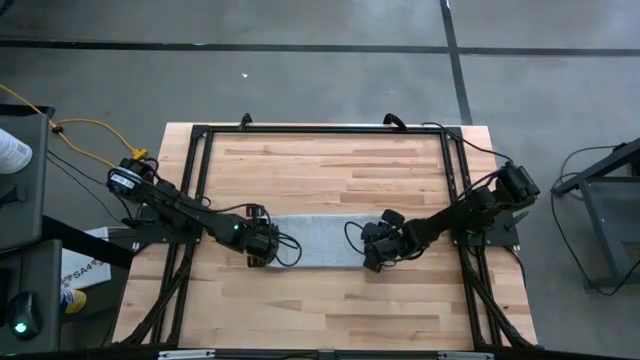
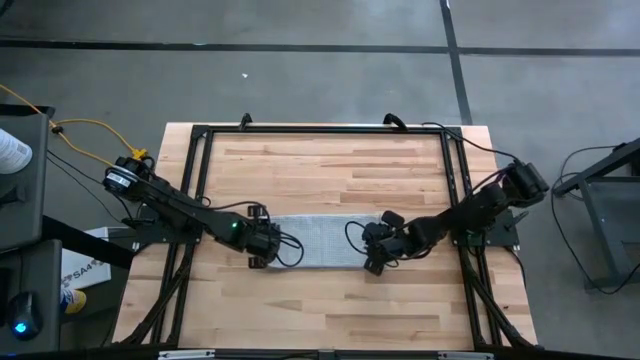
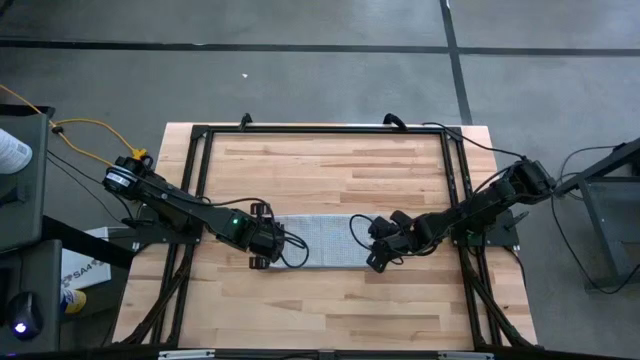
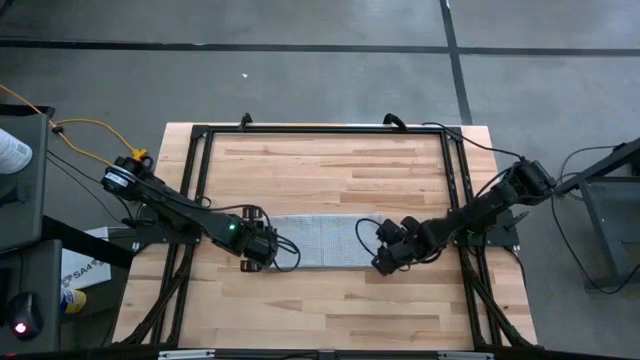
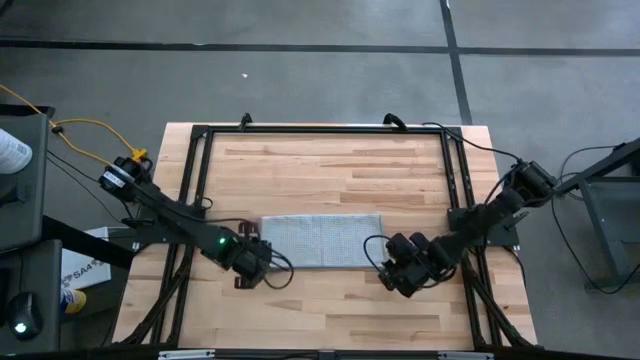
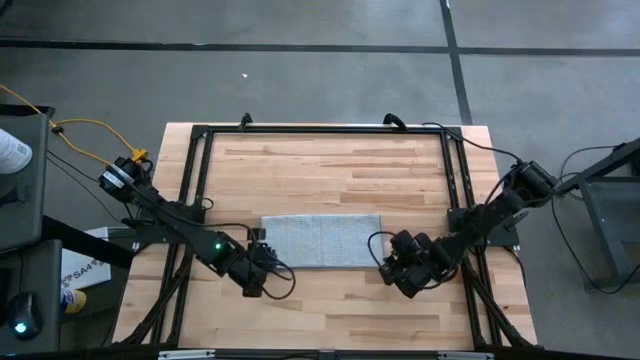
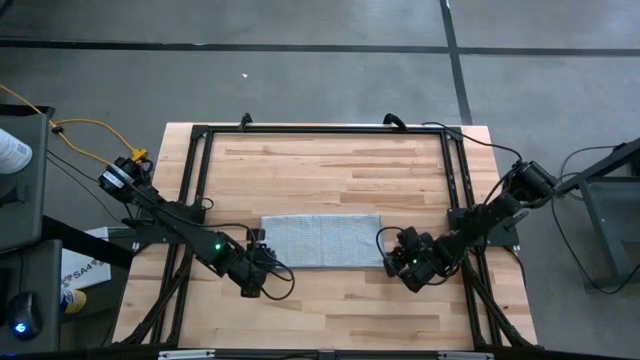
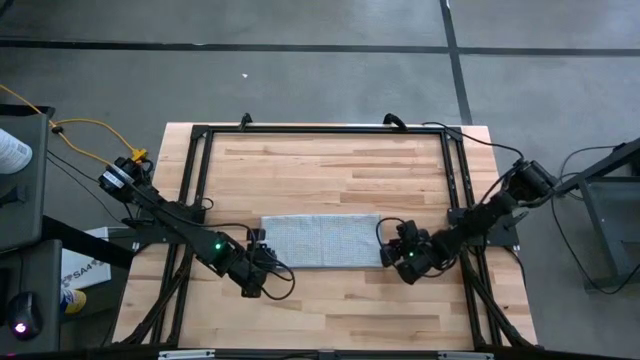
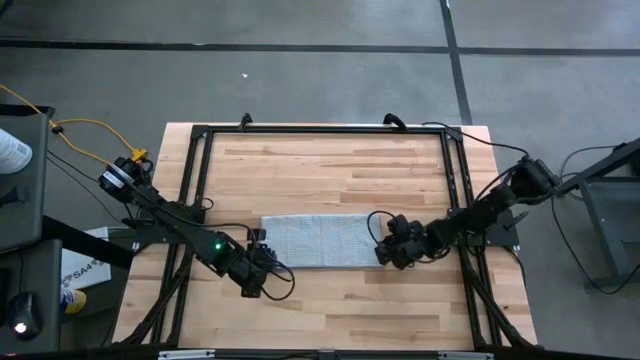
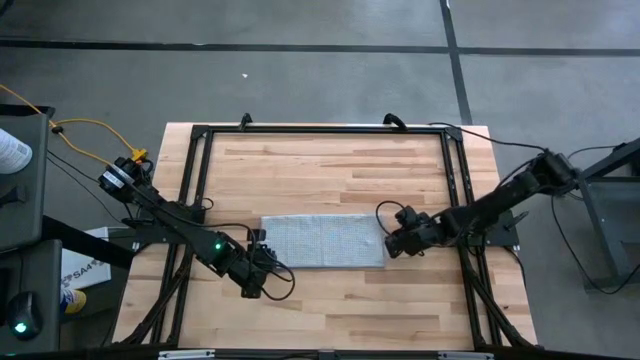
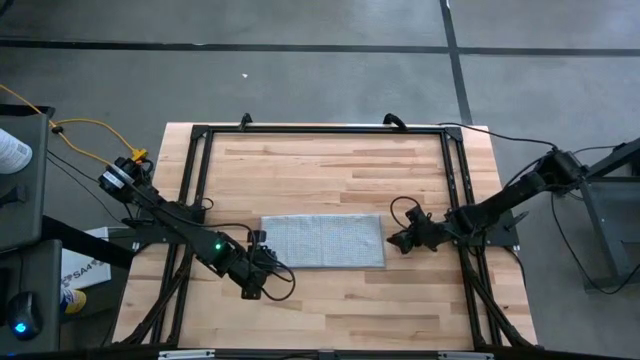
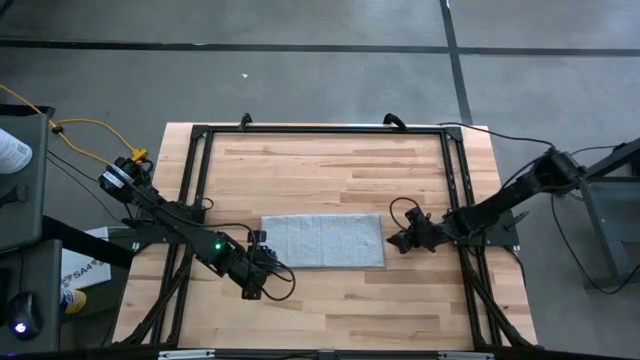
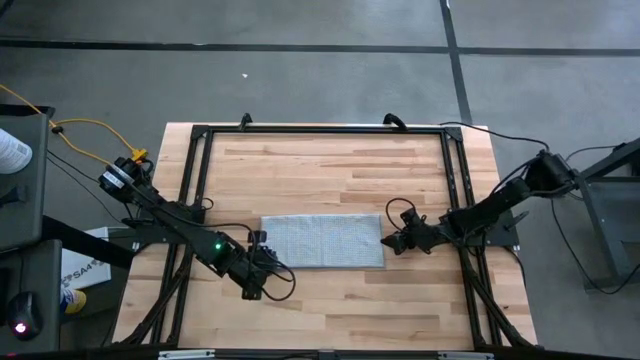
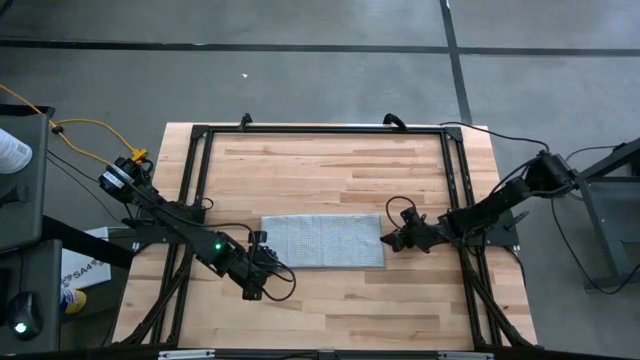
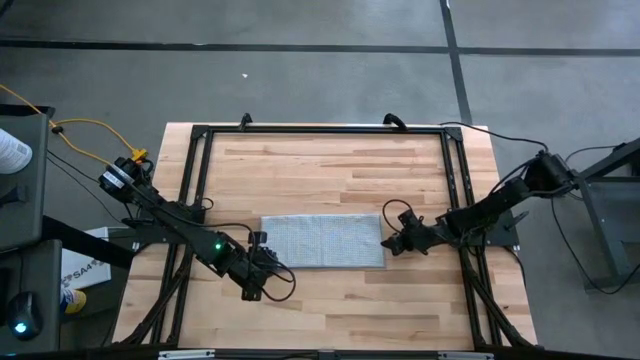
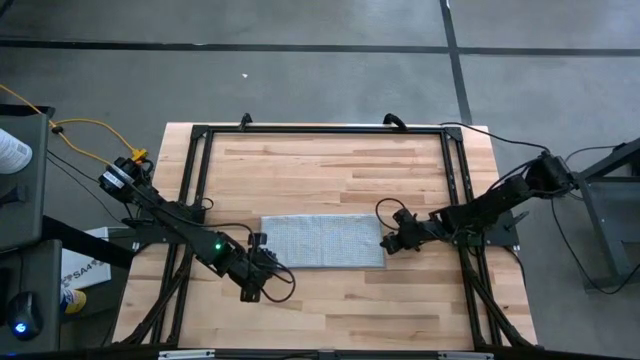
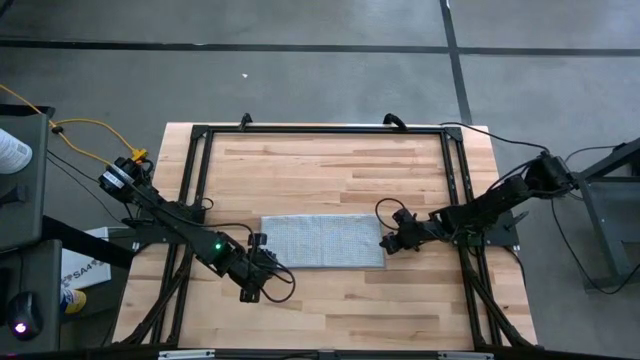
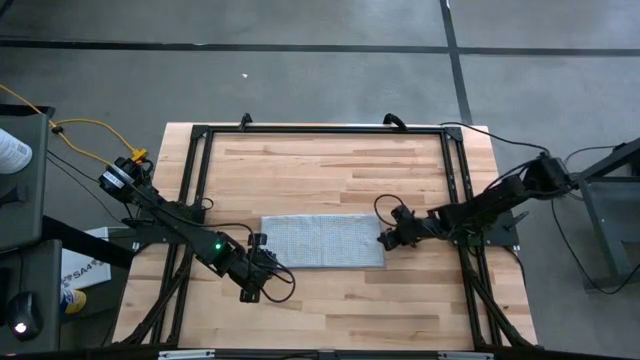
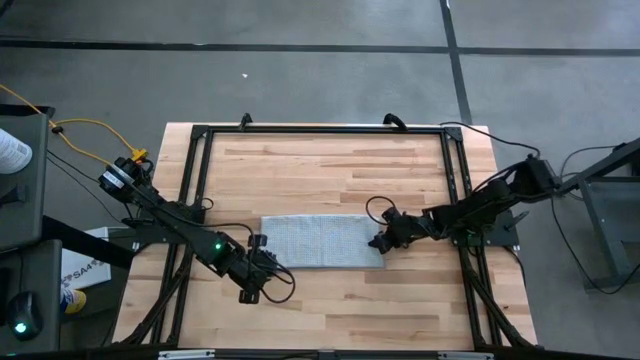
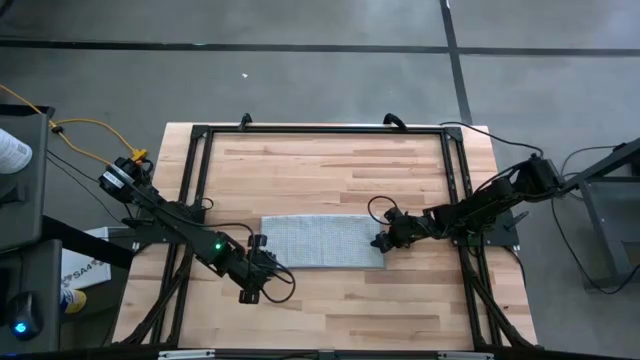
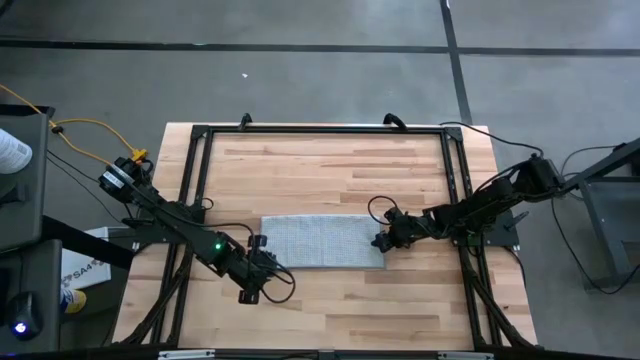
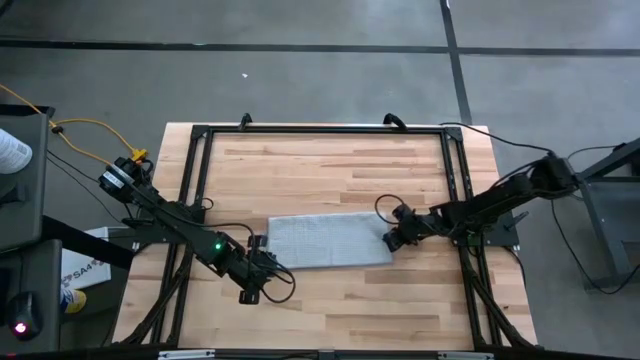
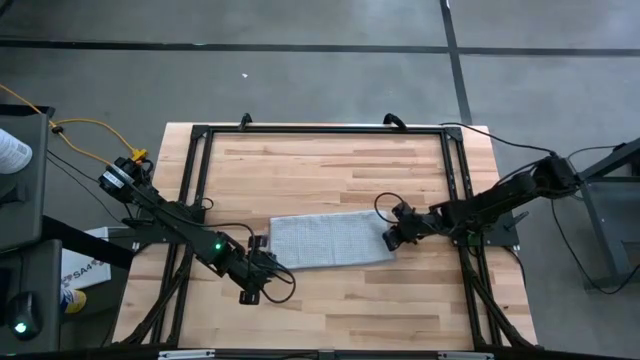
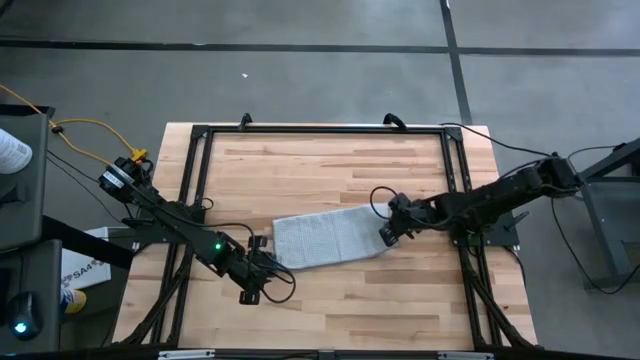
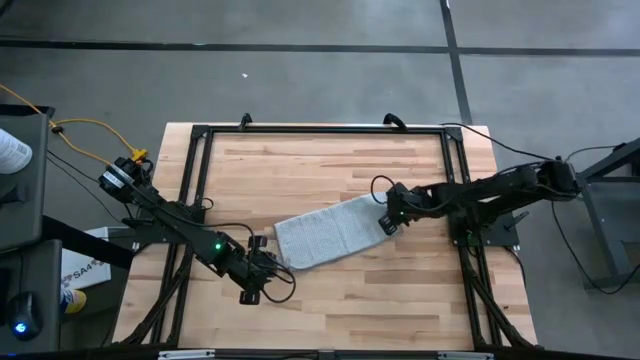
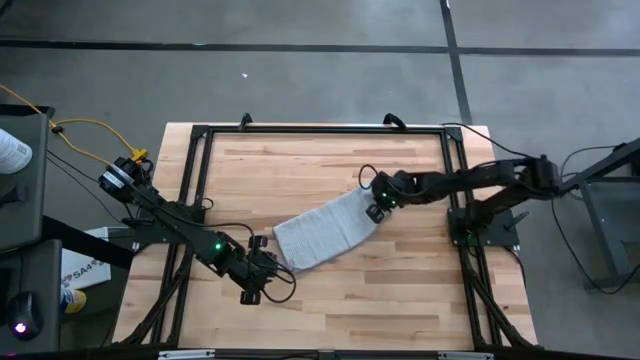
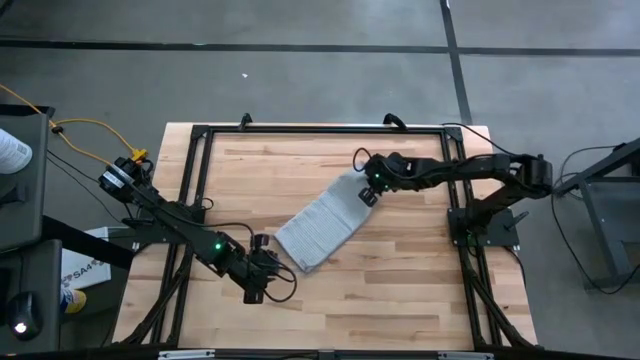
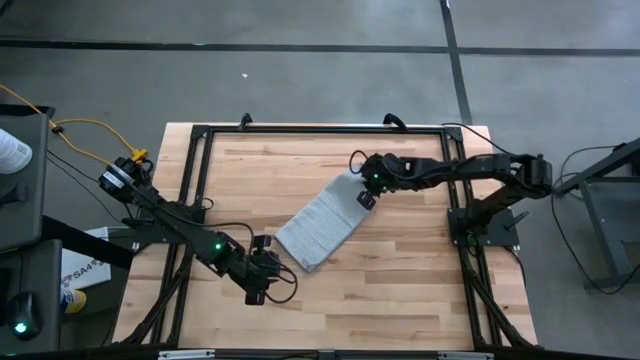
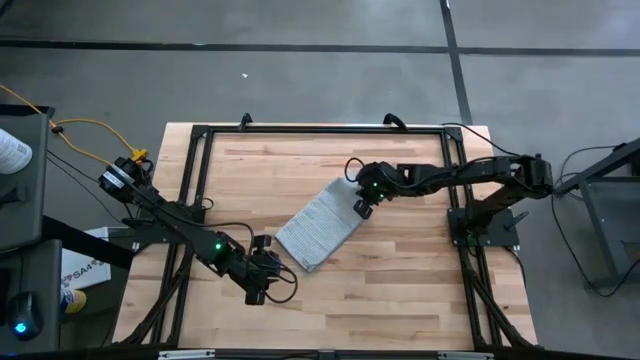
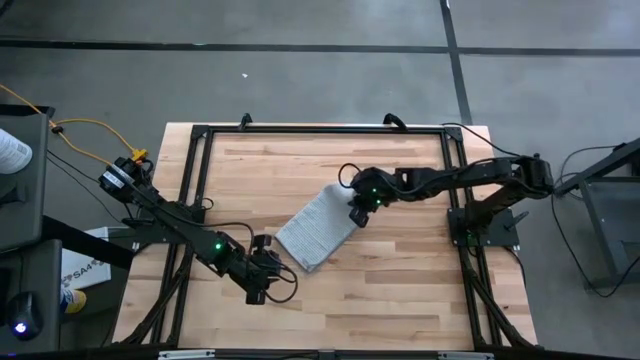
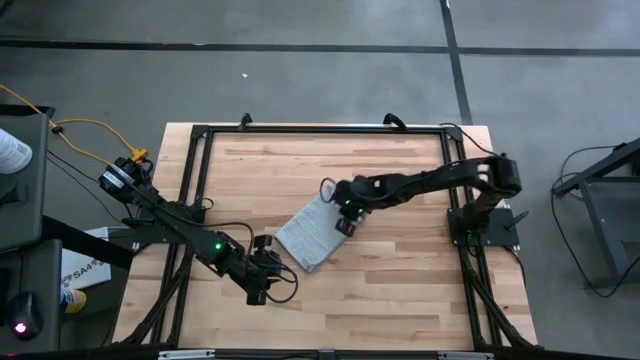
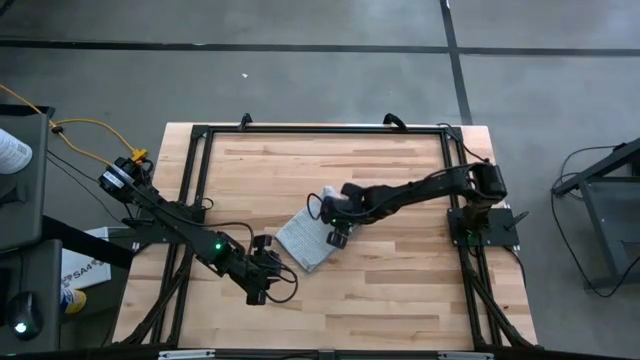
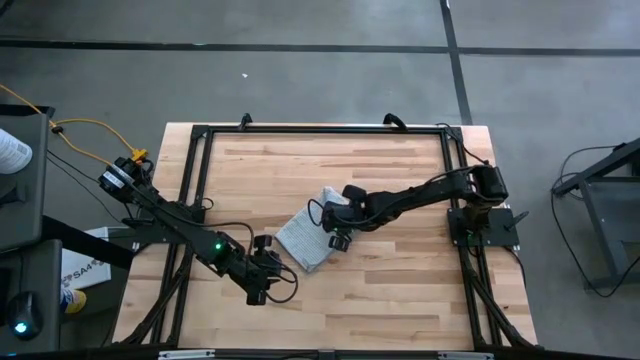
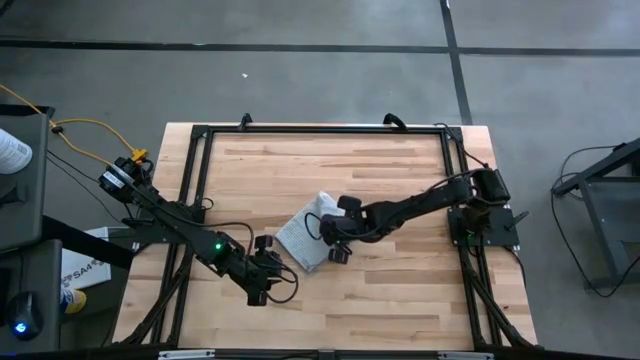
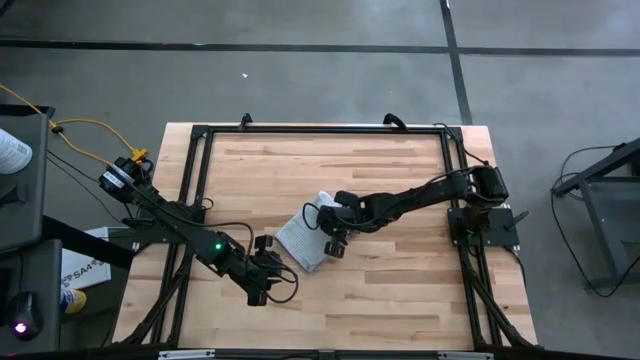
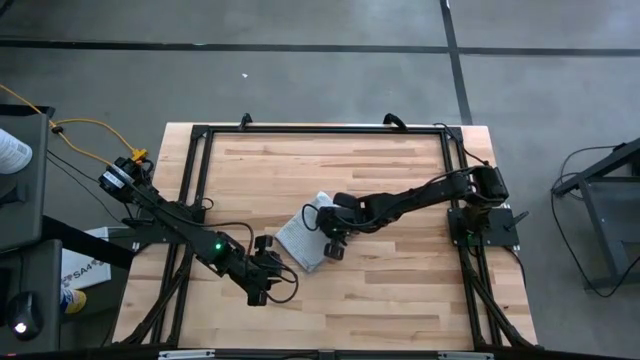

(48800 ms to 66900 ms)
Task: Fold microfiber towels
Fold the gray microfiber cloth

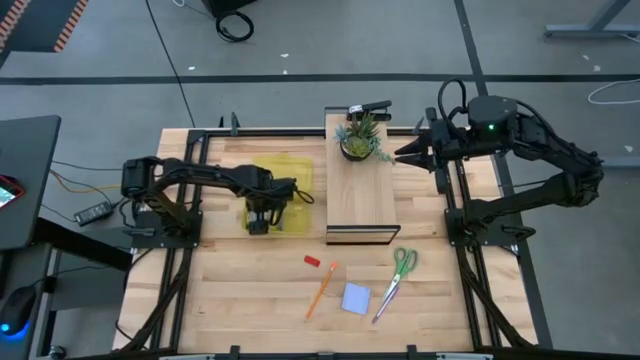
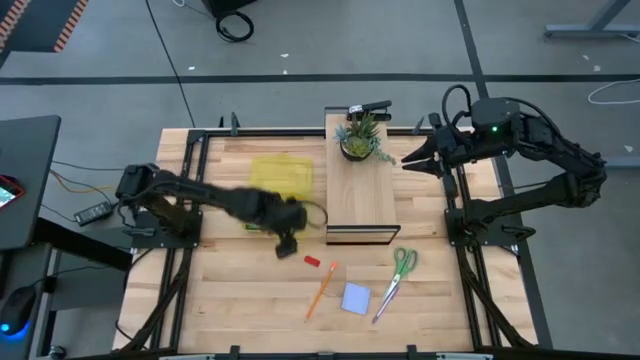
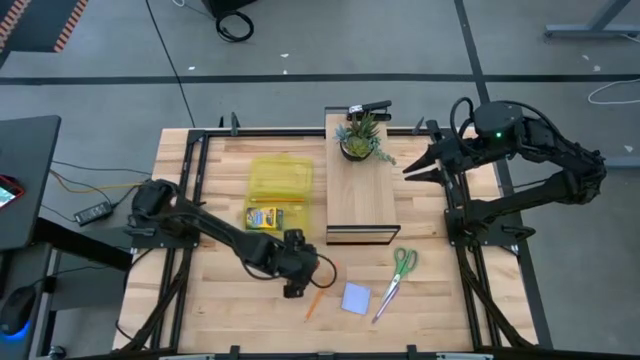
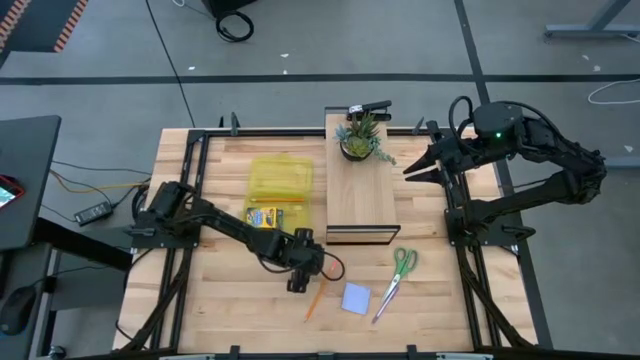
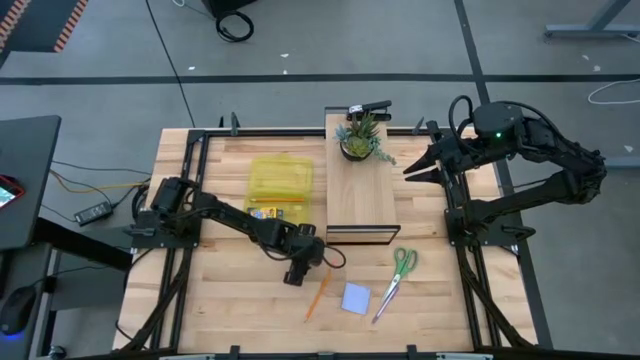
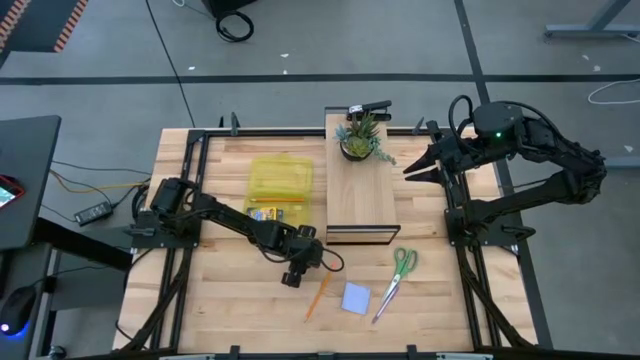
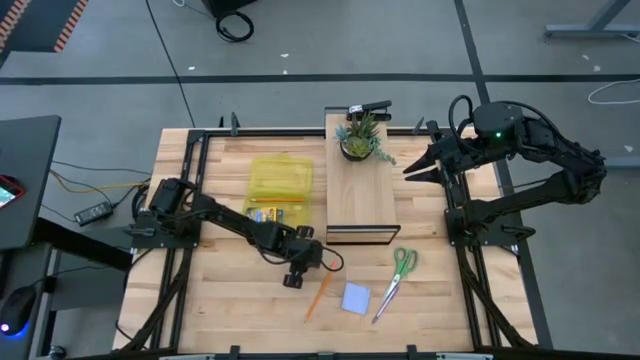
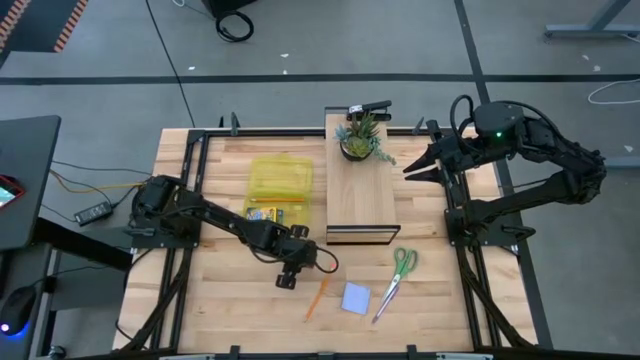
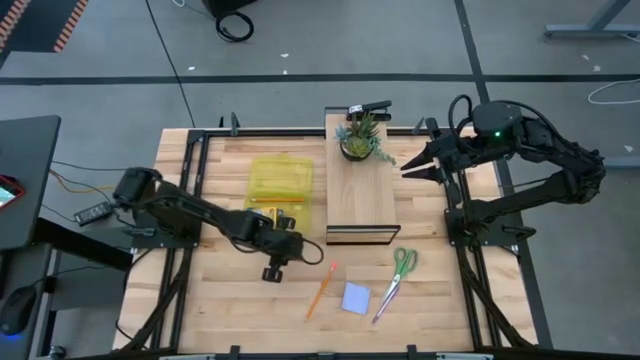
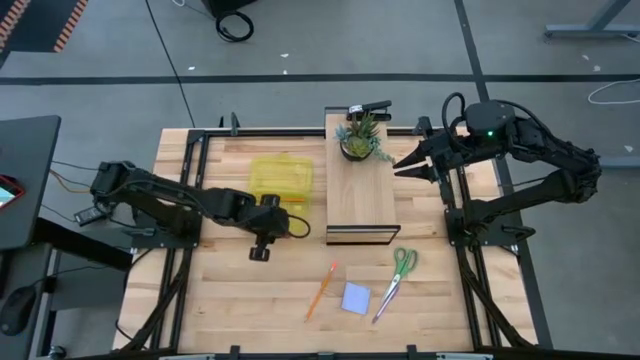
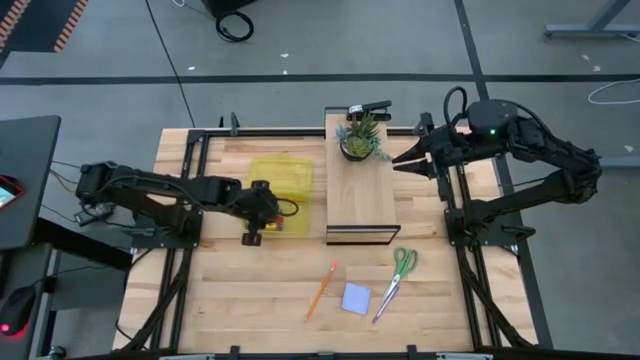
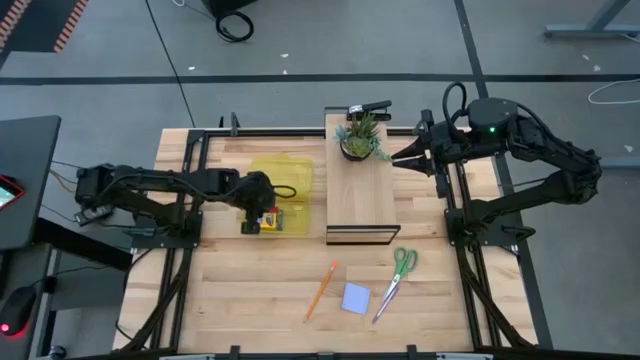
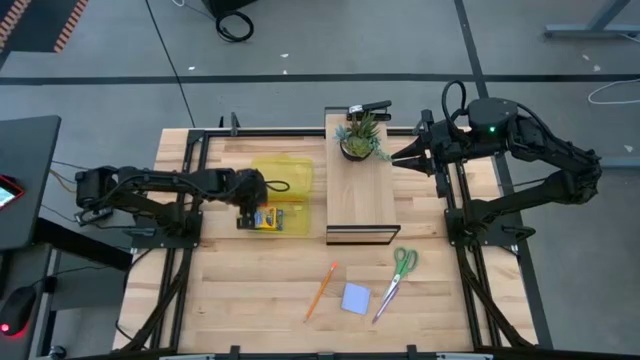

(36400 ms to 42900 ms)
Task: Pack school essentials
Put the eraser into the supply box
